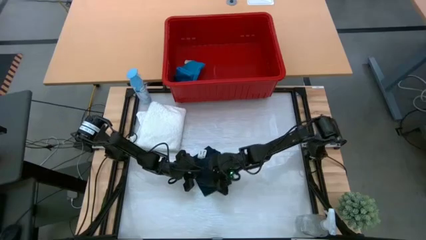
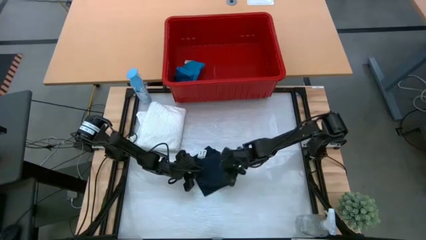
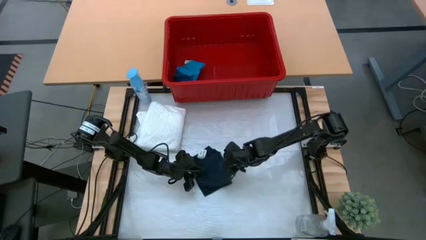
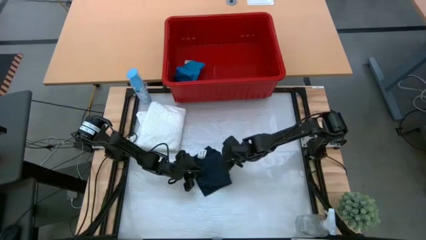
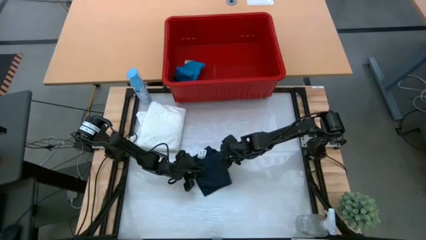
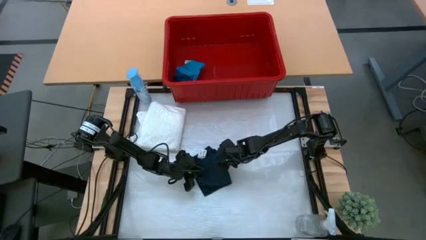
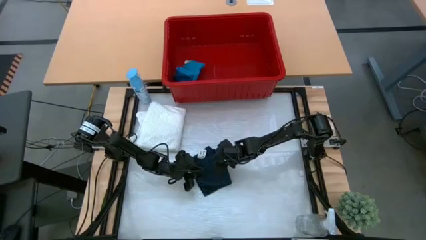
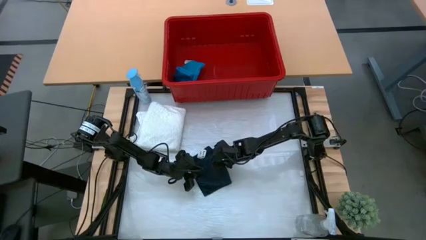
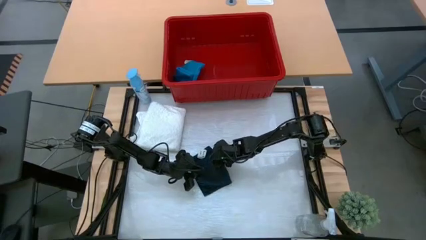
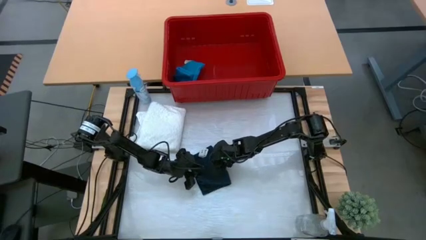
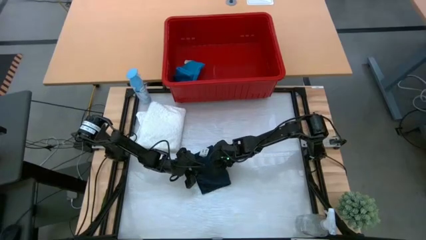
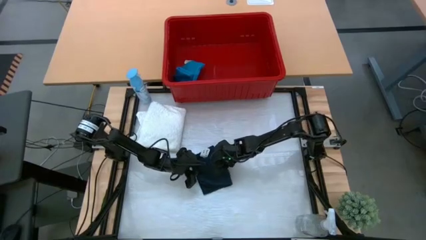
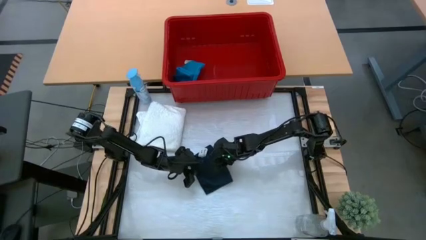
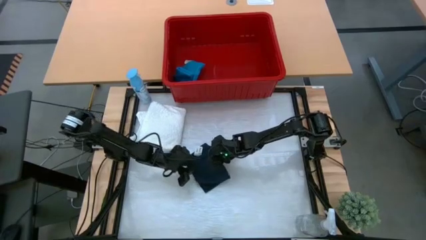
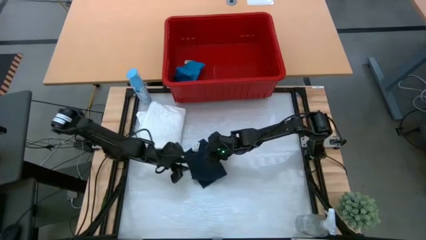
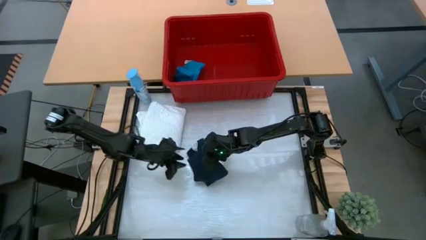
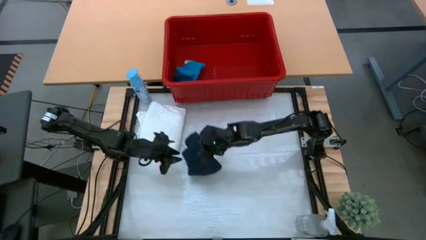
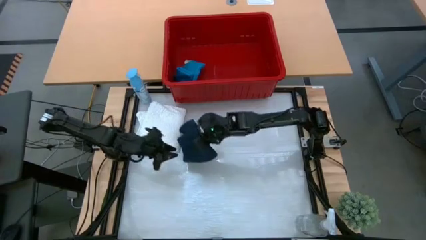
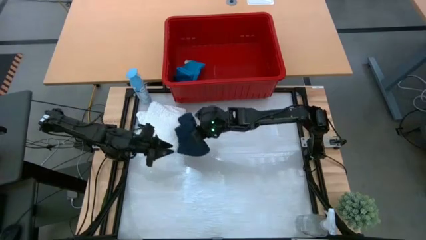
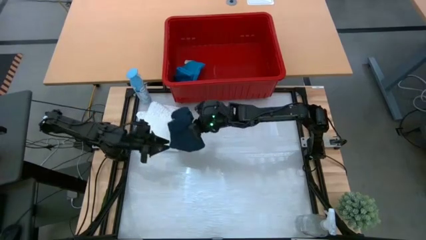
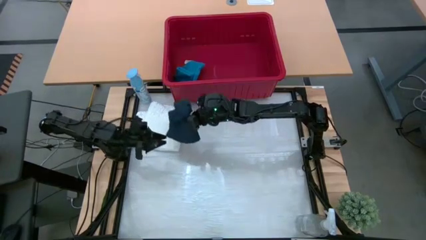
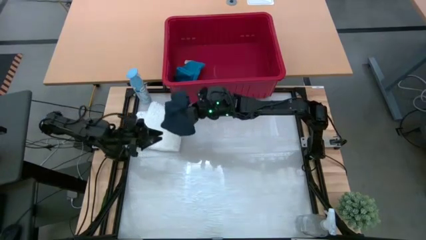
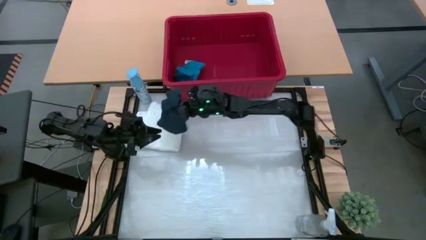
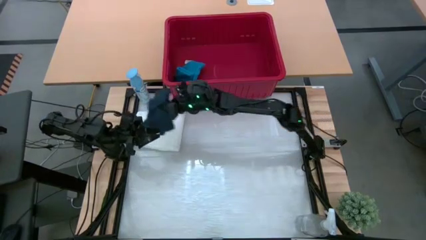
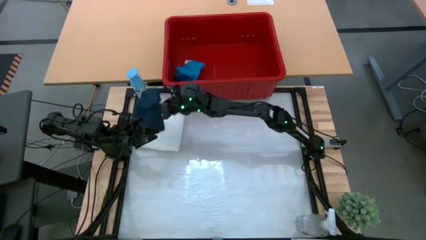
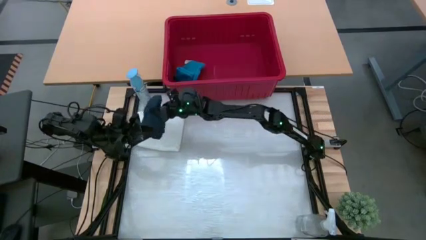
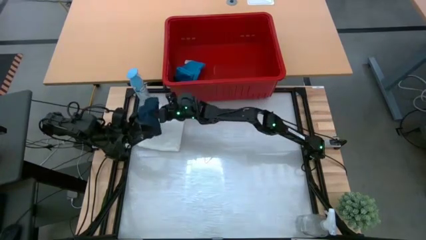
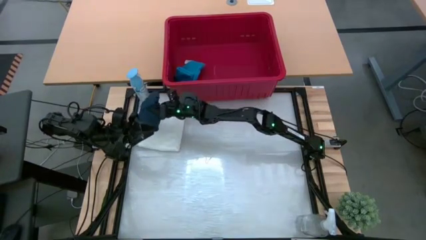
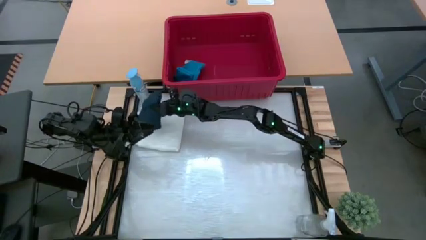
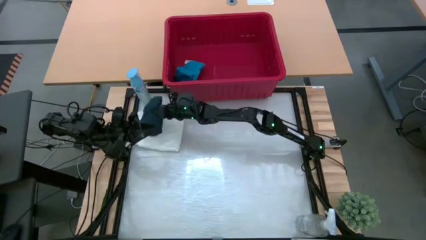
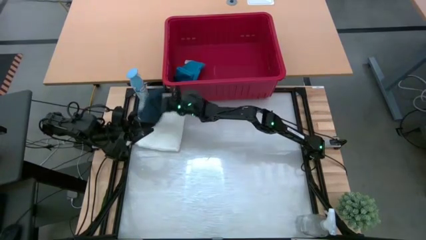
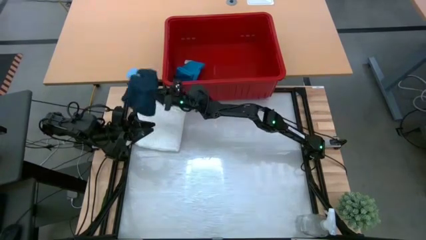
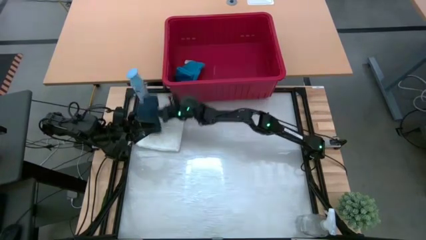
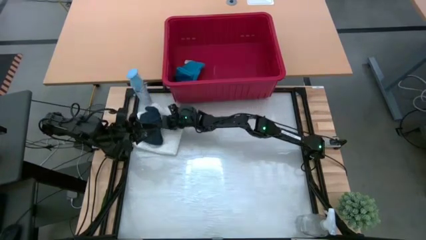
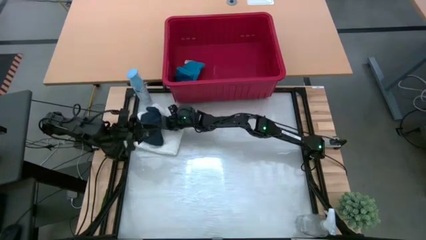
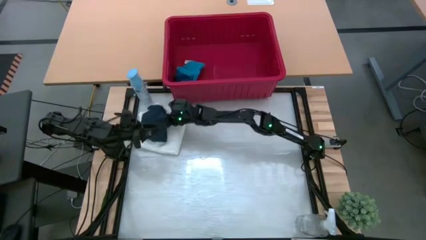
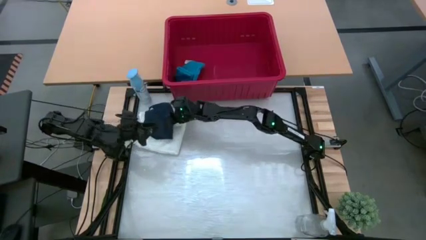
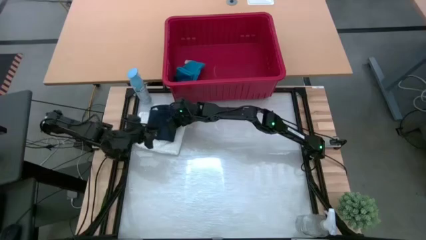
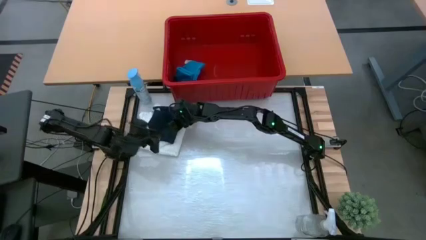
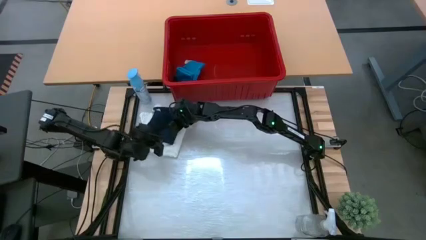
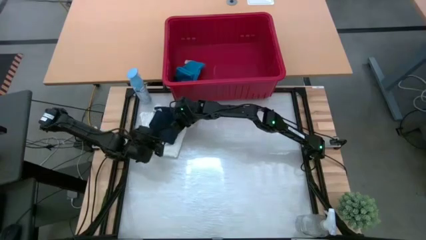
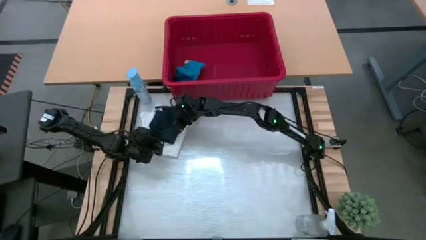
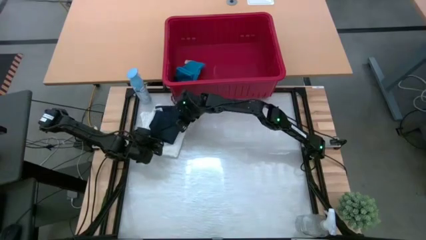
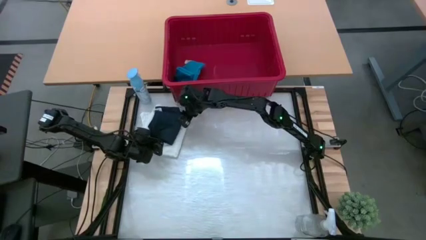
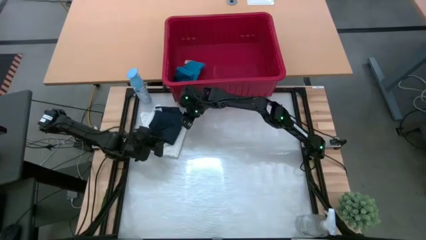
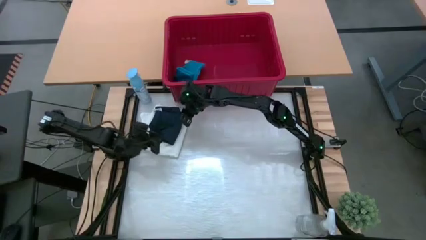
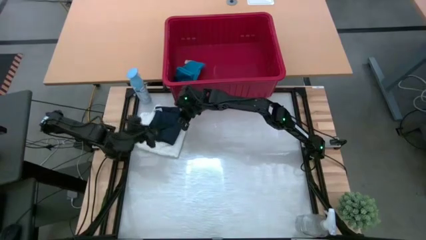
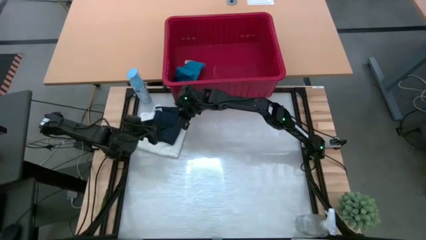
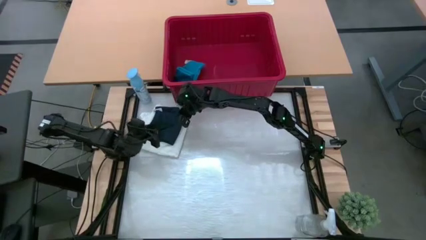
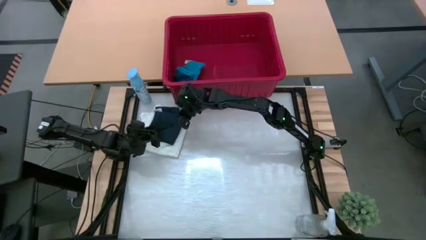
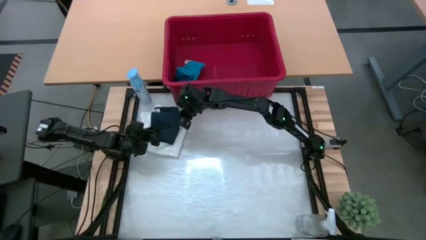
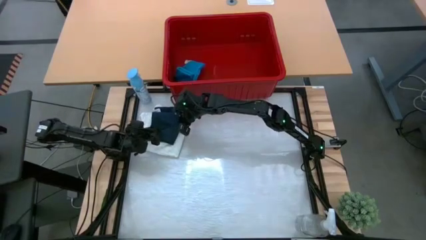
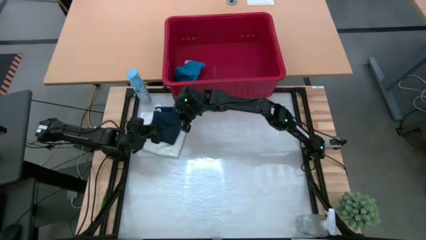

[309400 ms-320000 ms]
Task: Fold Laundry from Bin
Stack the black shorts on the white shirt

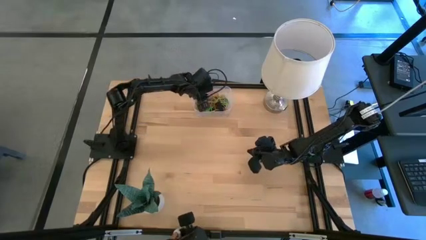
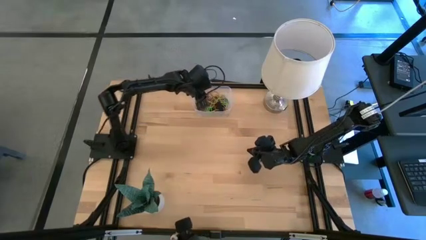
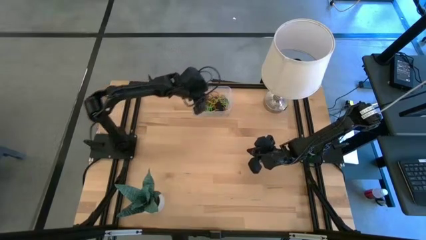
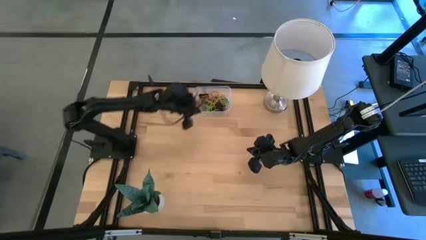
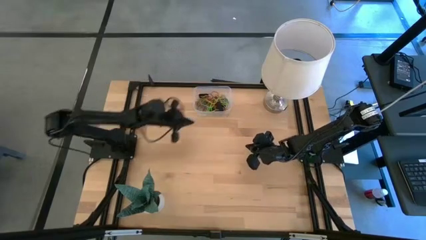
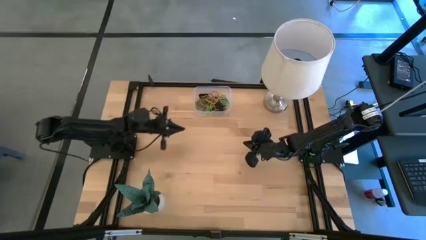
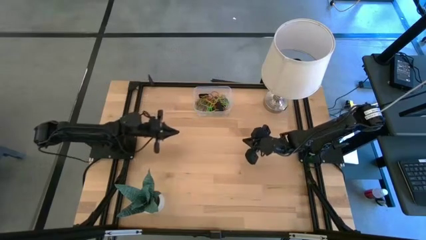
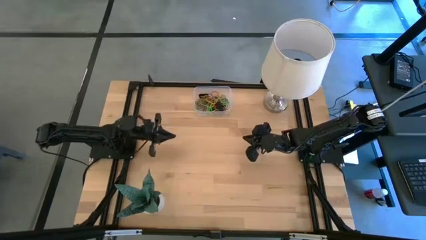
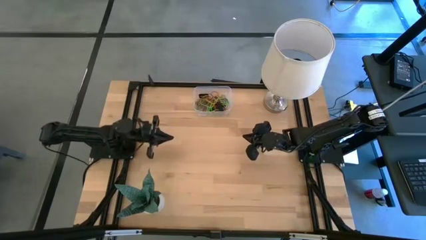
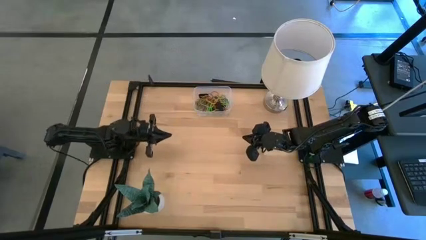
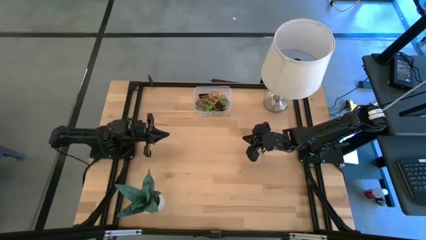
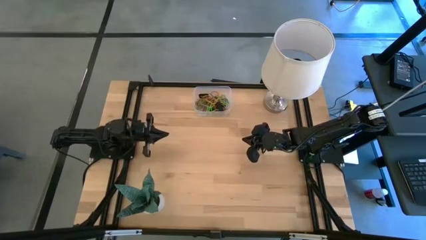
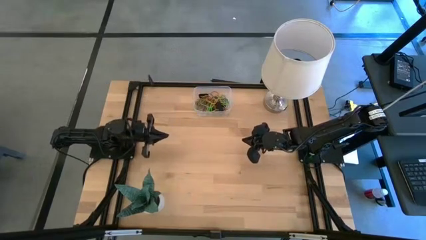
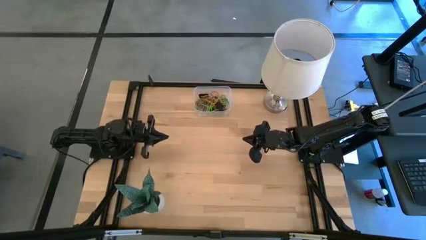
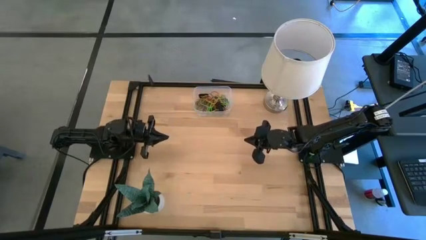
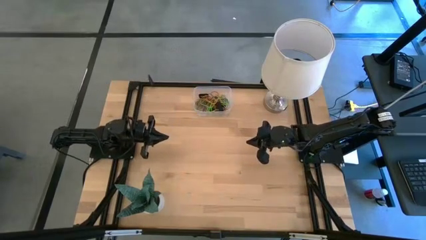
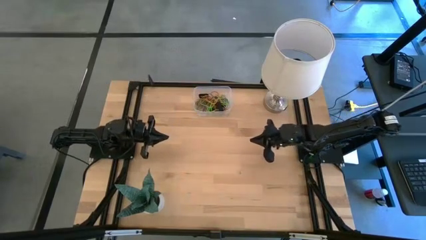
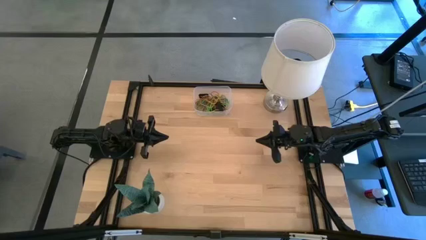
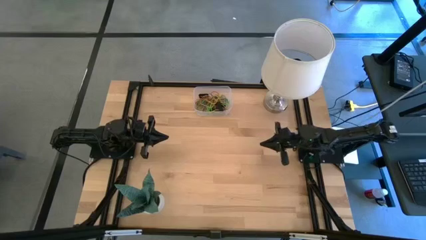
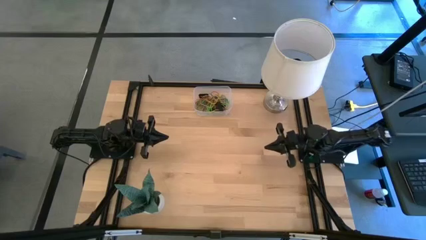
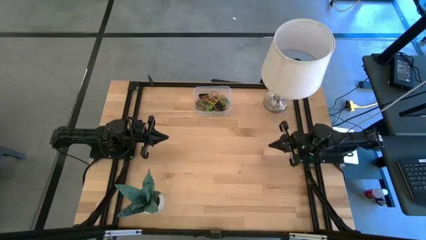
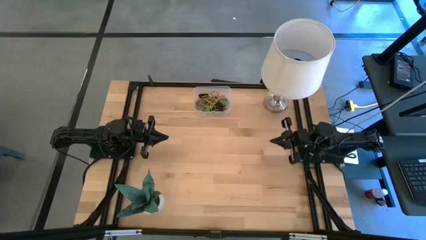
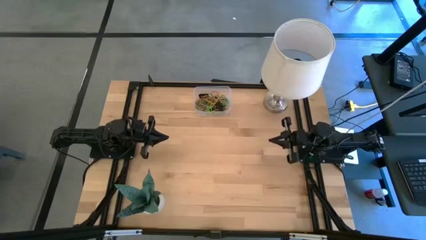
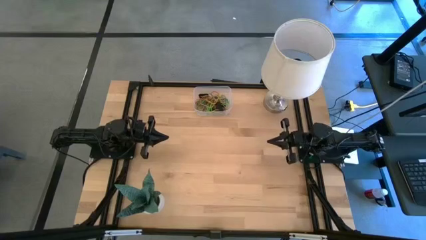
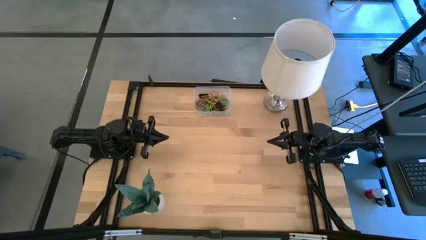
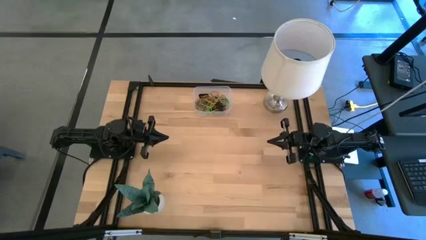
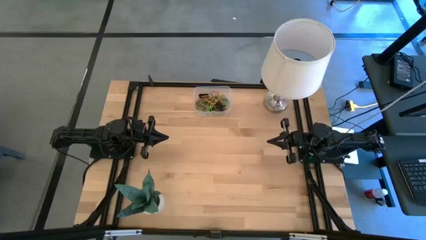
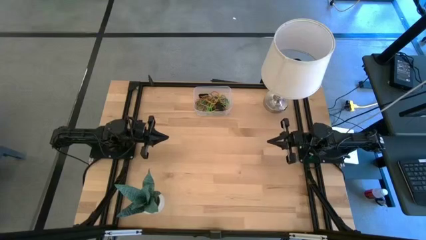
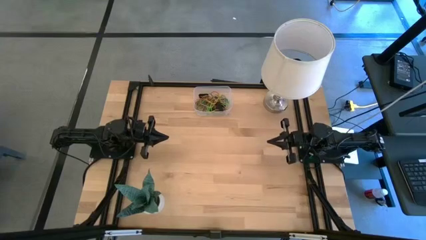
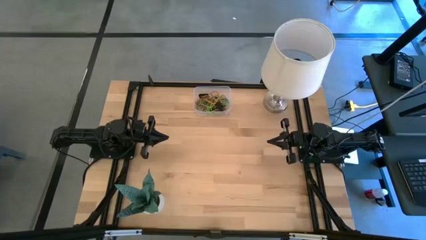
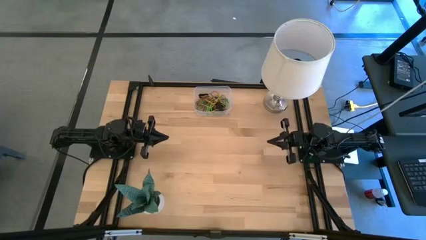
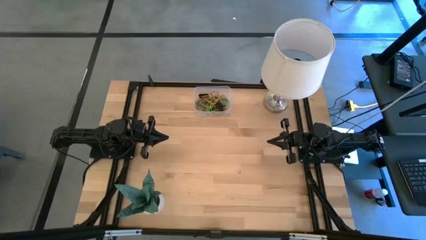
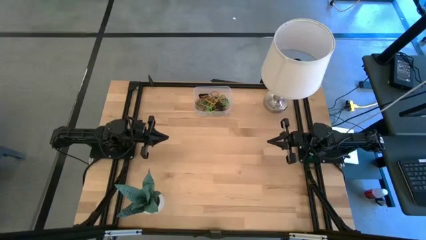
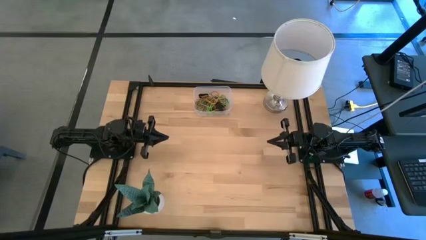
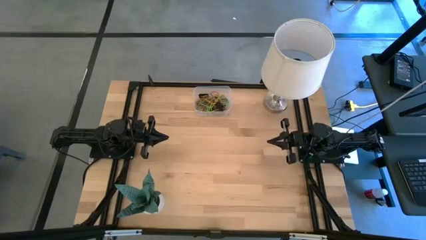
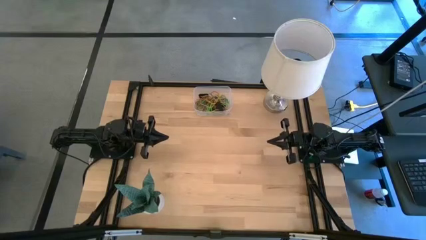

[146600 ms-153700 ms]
Task: Pick and place rubber bands into bin
Return to Home Position
